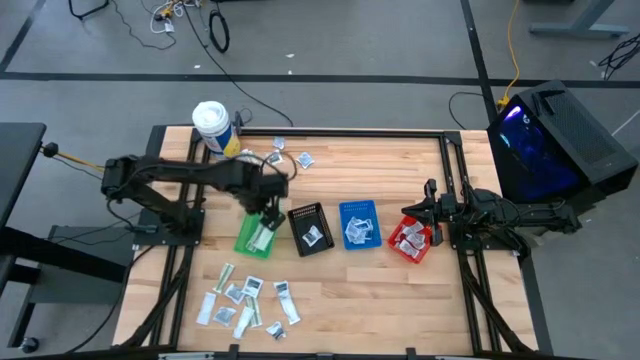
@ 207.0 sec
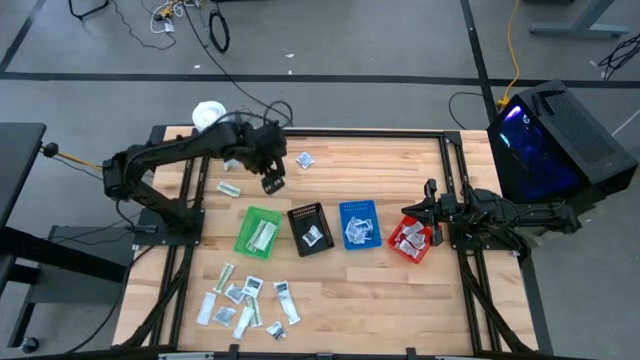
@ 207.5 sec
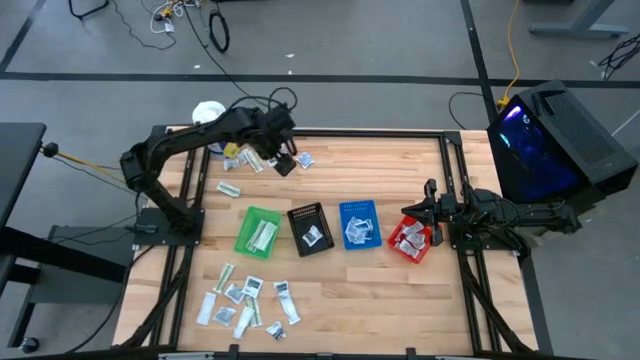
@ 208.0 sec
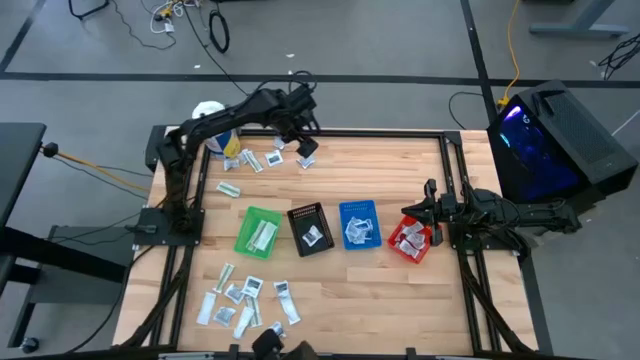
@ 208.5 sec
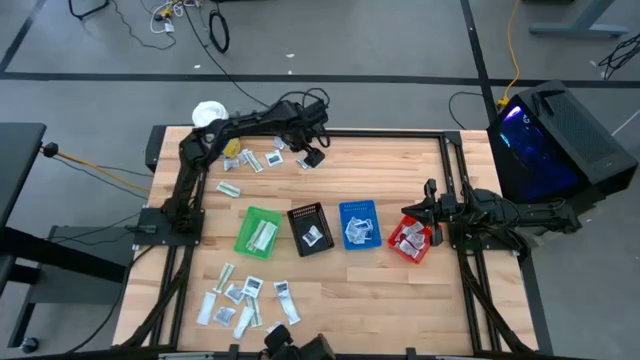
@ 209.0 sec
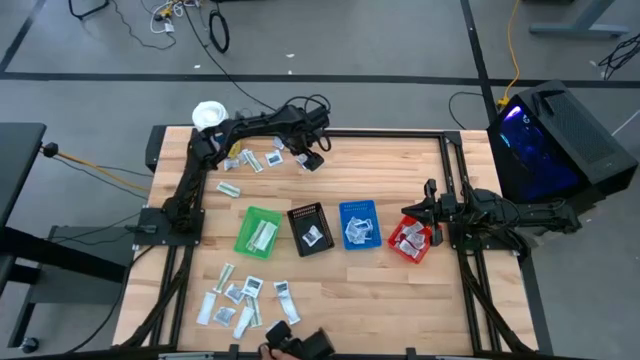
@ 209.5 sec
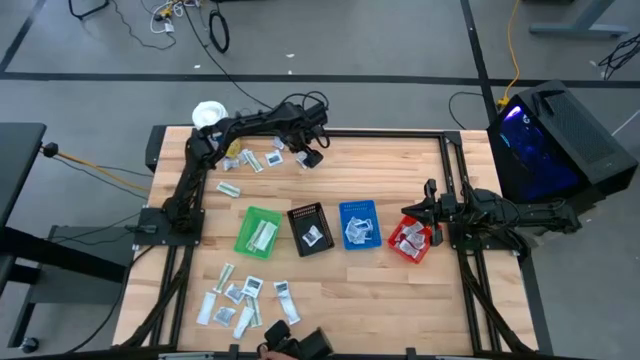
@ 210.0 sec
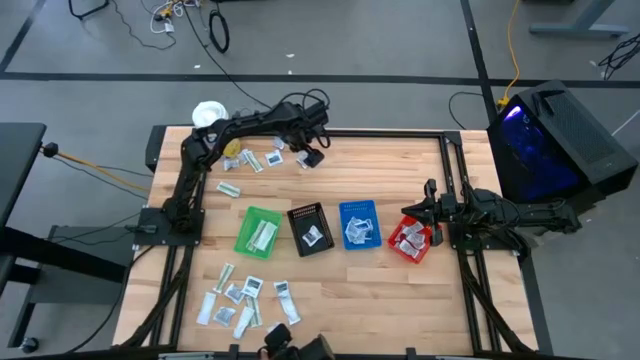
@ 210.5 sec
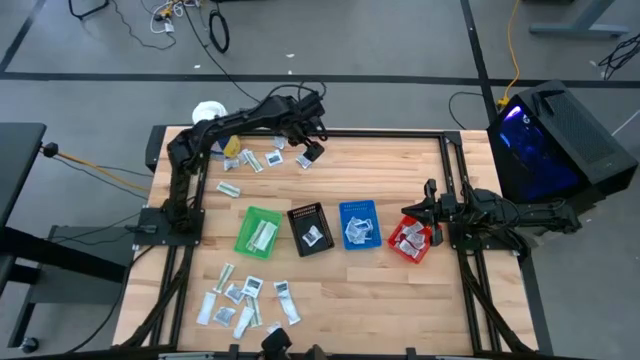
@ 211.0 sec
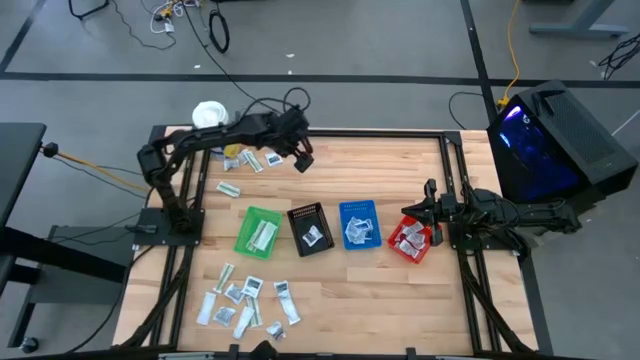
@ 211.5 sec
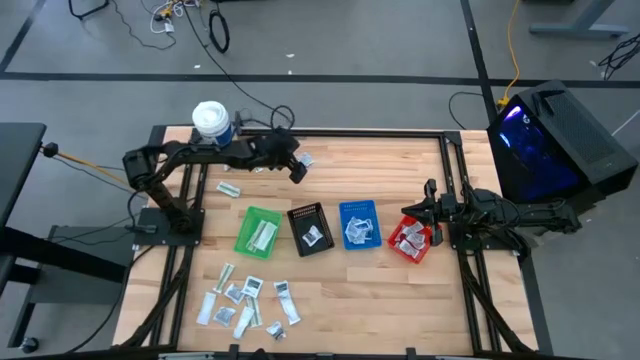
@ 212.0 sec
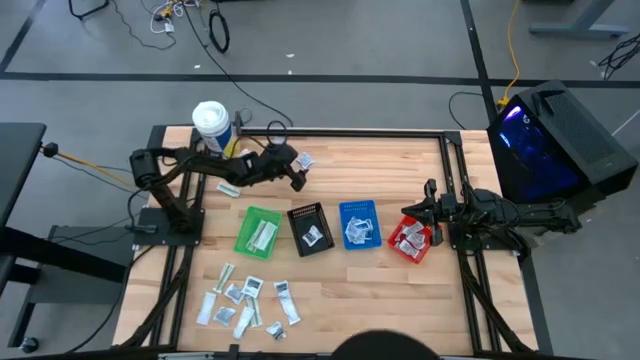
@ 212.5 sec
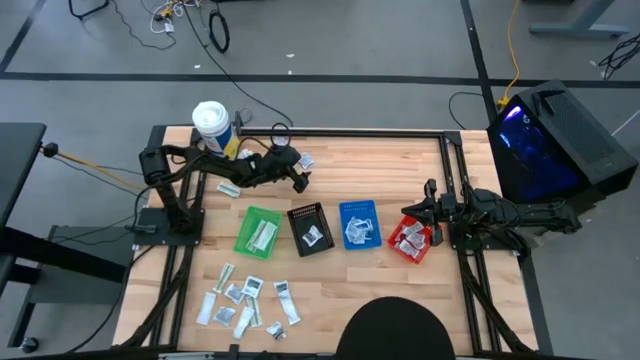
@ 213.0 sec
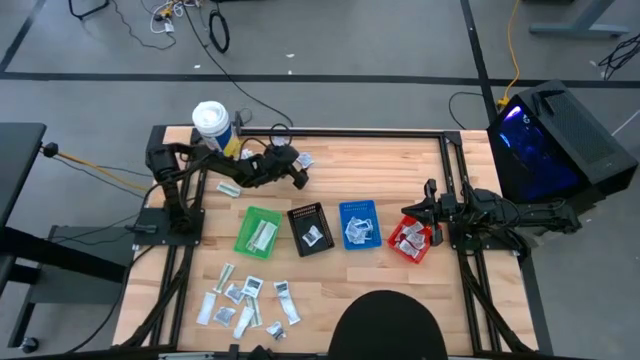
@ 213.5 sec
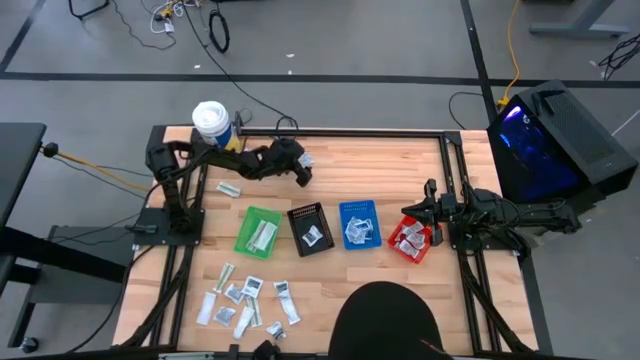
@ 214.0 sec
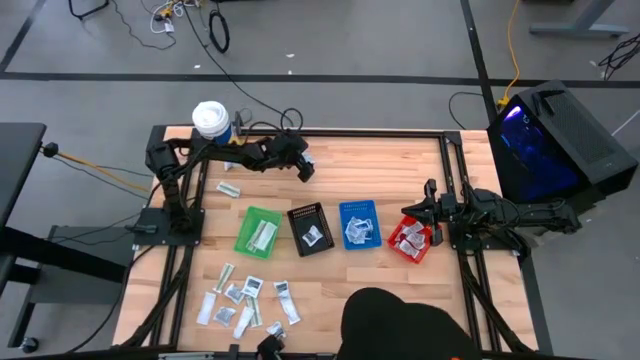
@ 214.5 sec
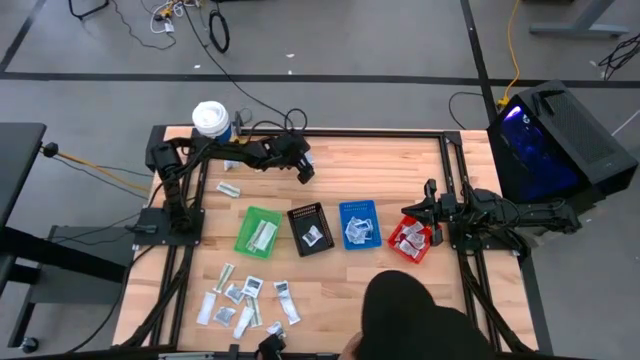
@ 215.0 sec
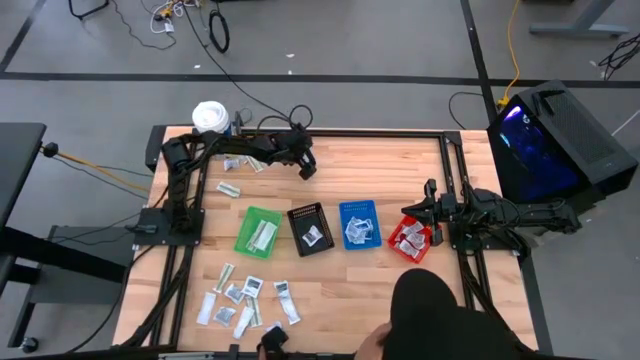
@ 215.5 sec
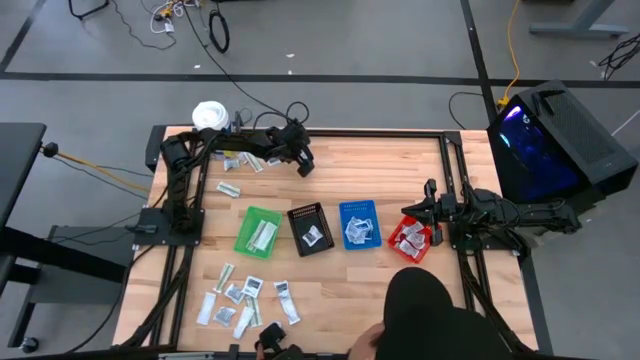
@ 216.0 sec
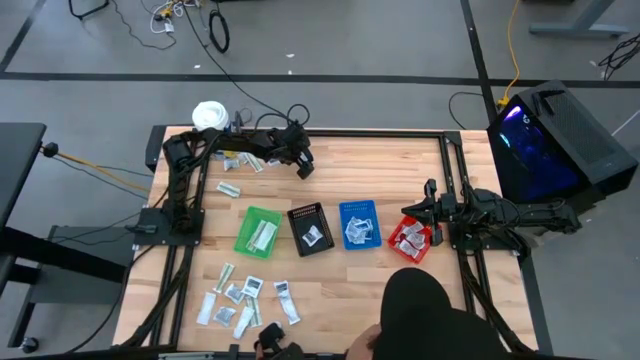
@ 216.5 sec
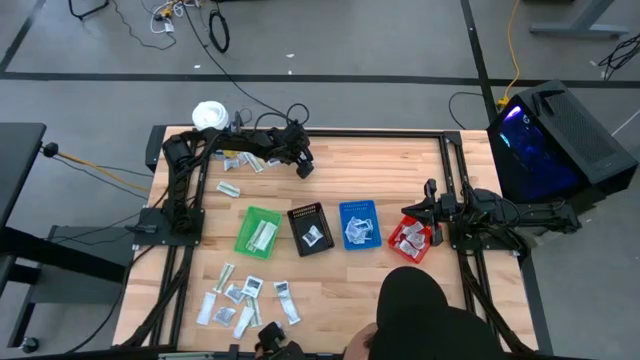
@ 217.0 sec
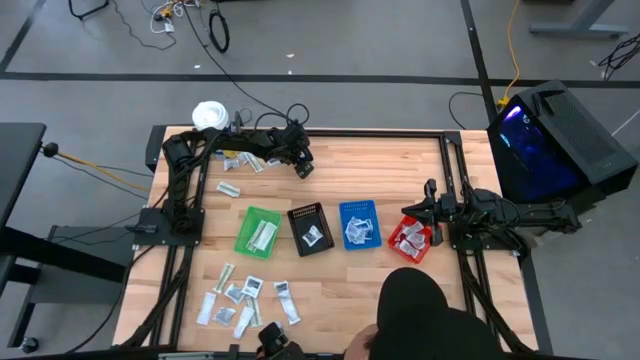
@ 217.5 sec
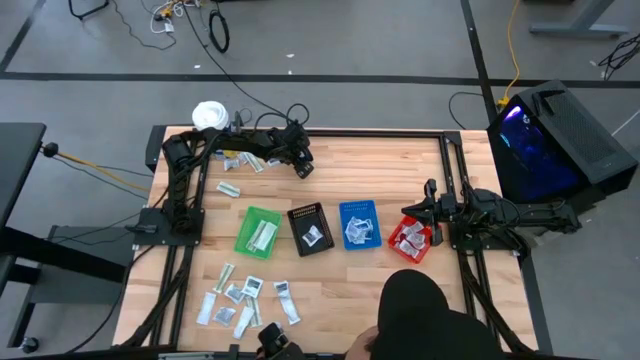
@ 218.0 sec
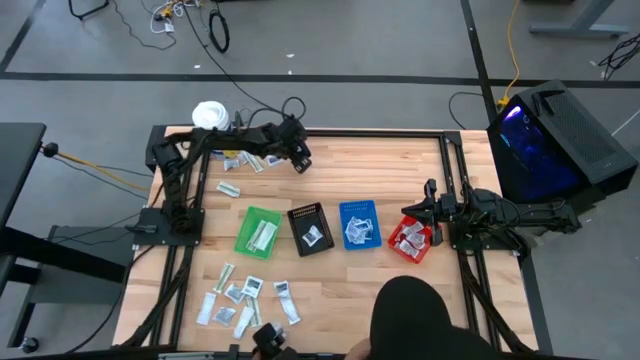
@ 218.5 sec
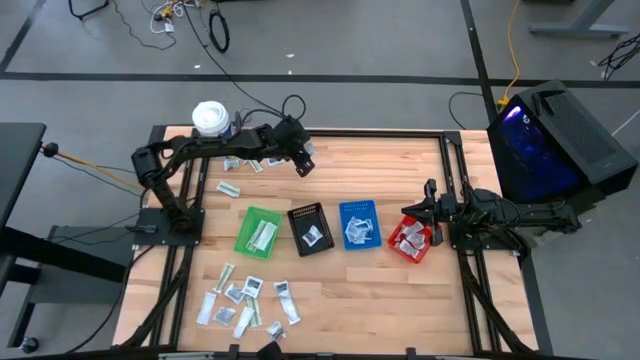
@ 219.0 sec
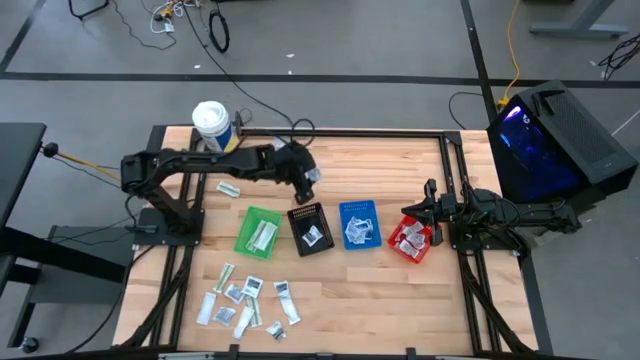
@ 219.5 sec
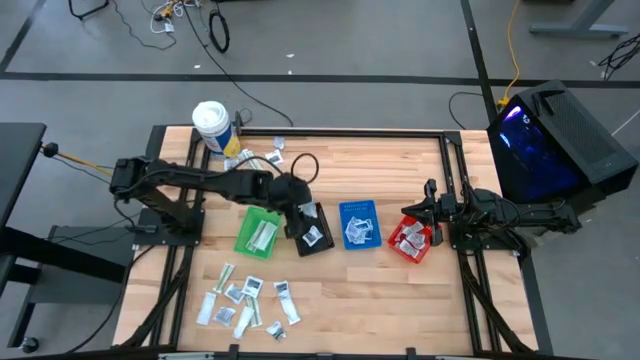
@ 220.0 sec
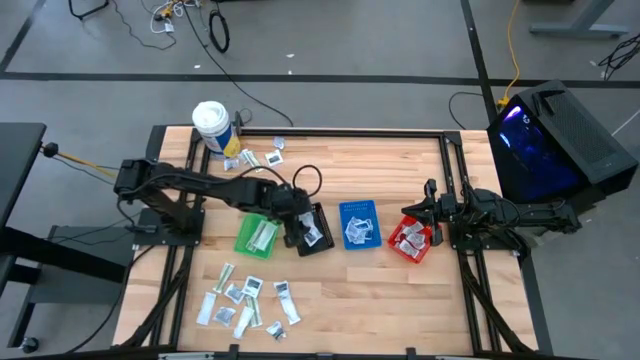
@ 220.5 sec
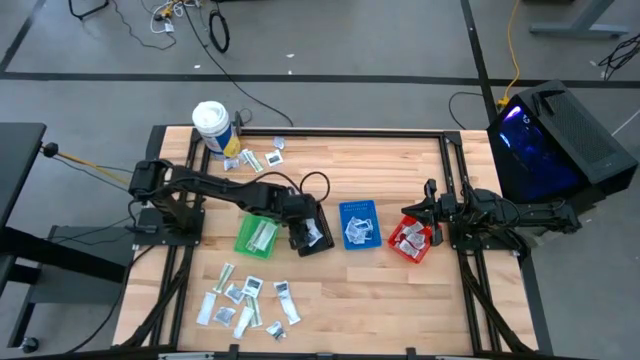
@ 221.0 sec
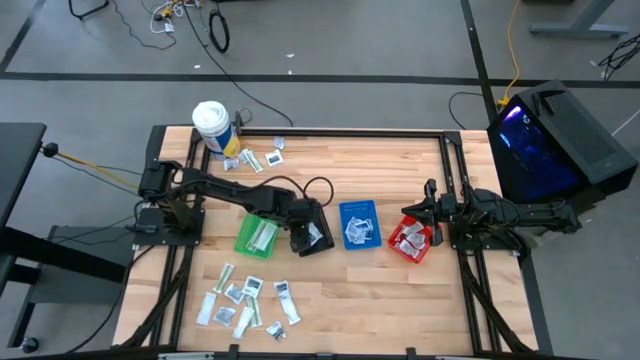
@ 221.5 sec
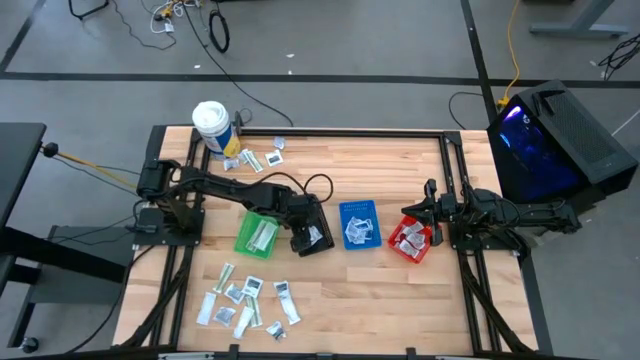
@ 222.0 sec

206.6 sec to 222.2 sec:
Task: Pick & Place First Aid Supplies
Put the towelette pack into the black basket
